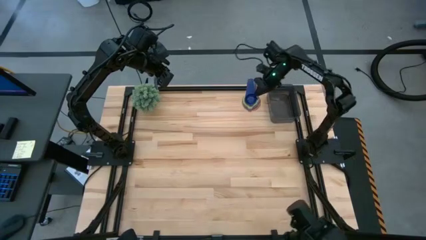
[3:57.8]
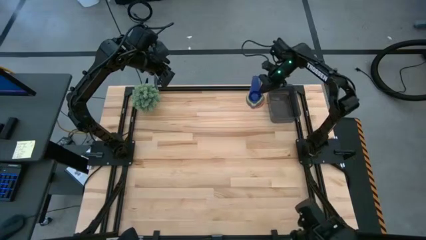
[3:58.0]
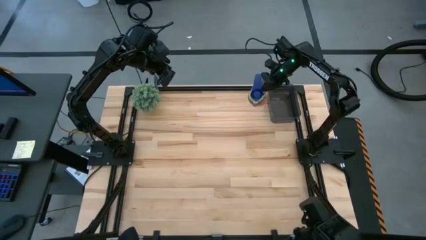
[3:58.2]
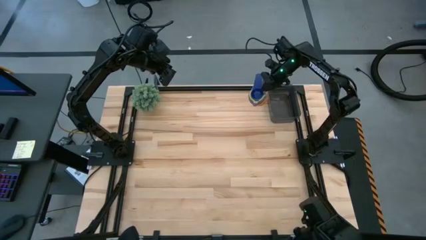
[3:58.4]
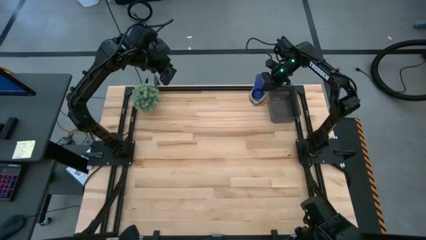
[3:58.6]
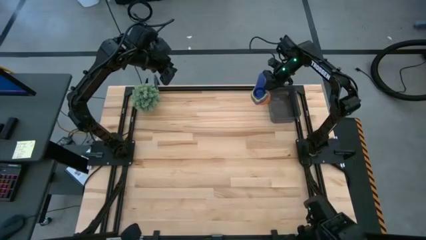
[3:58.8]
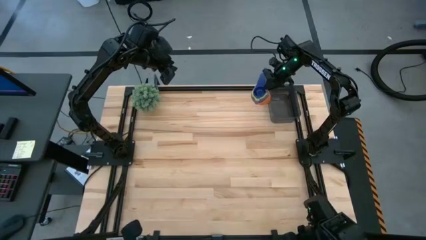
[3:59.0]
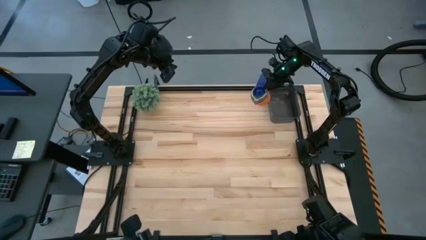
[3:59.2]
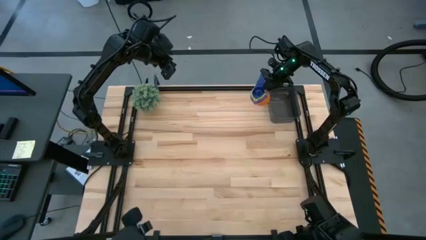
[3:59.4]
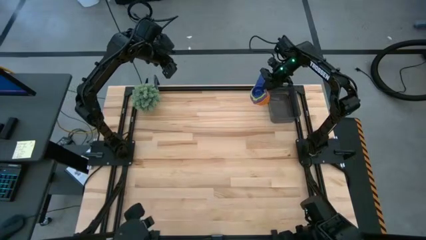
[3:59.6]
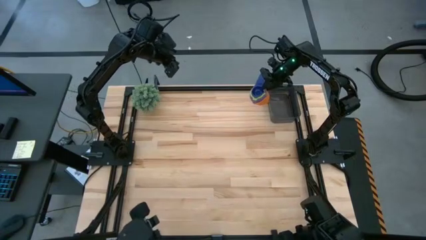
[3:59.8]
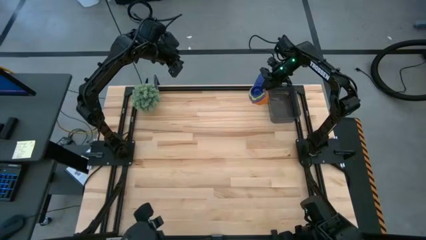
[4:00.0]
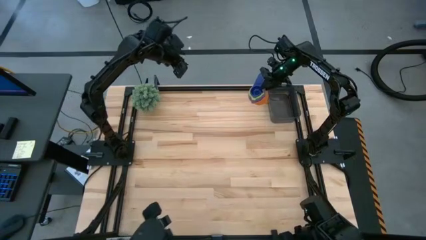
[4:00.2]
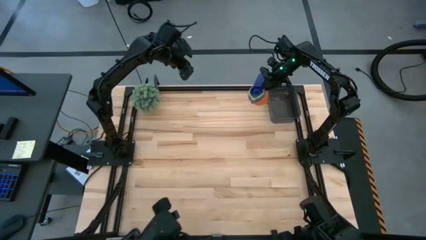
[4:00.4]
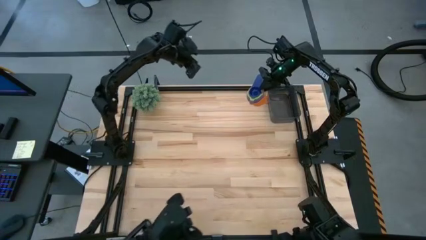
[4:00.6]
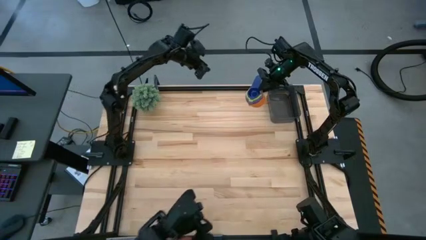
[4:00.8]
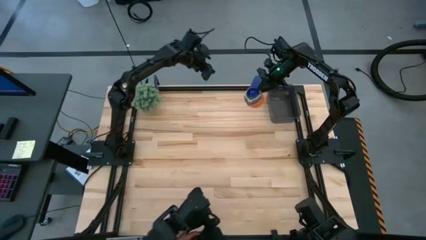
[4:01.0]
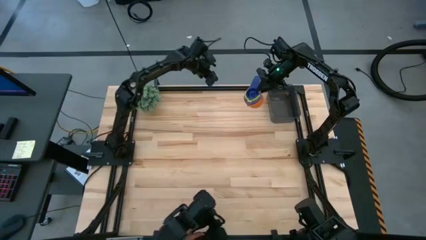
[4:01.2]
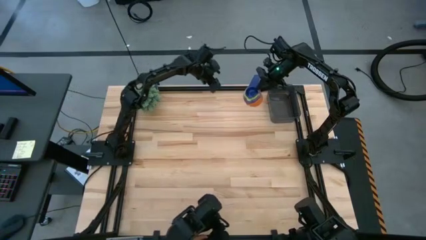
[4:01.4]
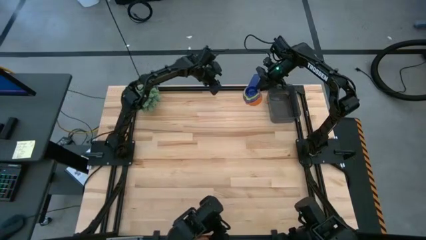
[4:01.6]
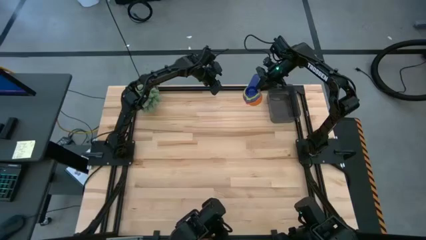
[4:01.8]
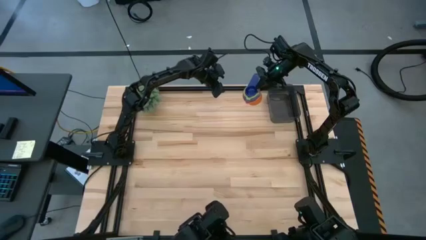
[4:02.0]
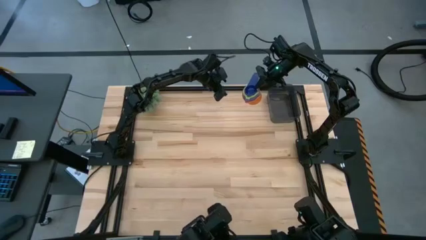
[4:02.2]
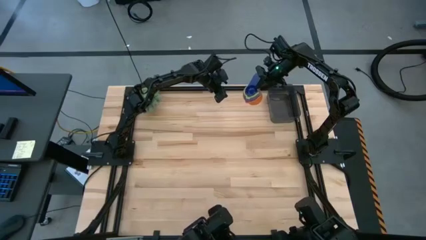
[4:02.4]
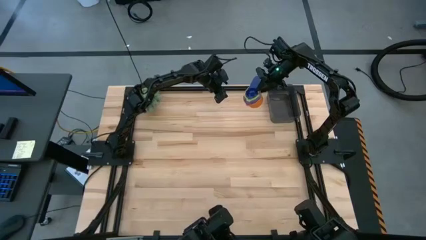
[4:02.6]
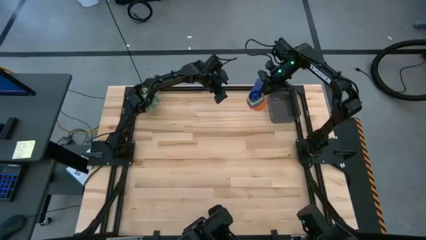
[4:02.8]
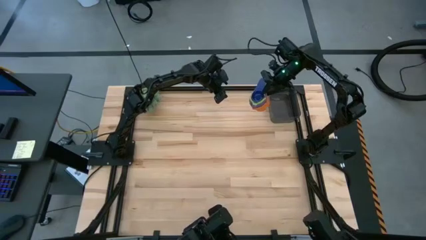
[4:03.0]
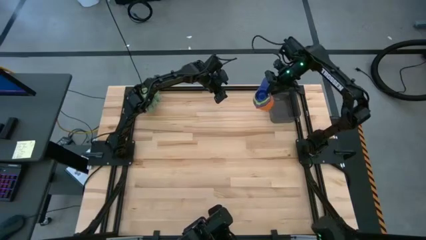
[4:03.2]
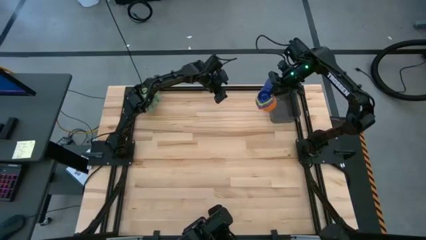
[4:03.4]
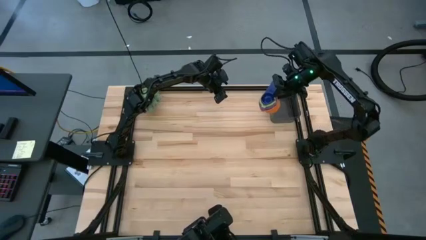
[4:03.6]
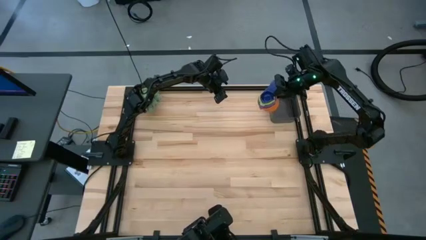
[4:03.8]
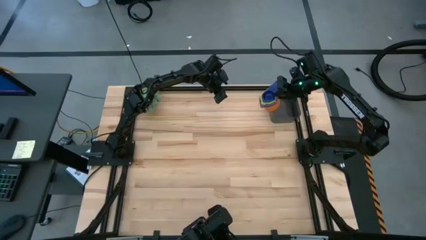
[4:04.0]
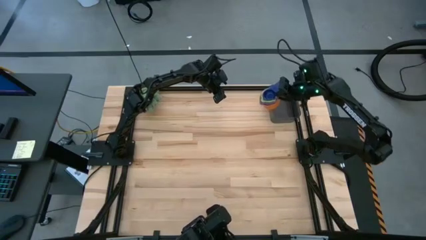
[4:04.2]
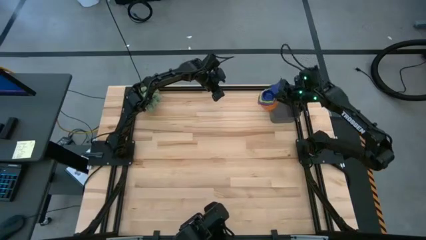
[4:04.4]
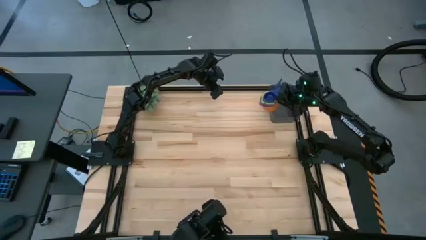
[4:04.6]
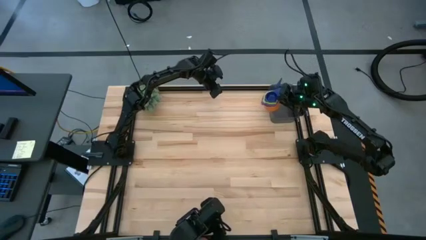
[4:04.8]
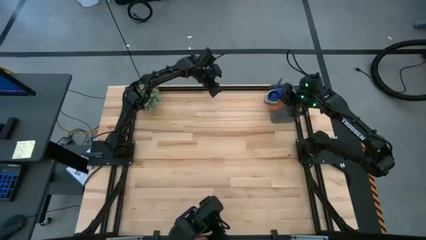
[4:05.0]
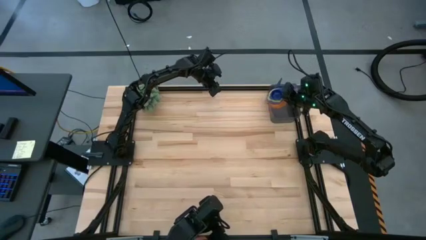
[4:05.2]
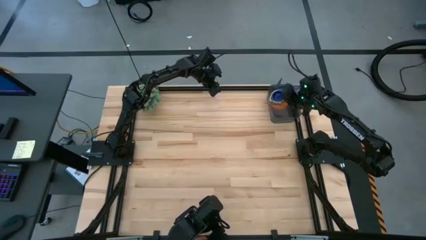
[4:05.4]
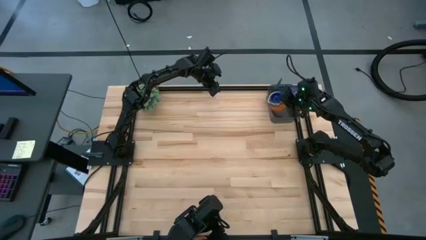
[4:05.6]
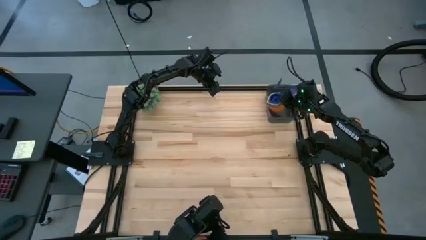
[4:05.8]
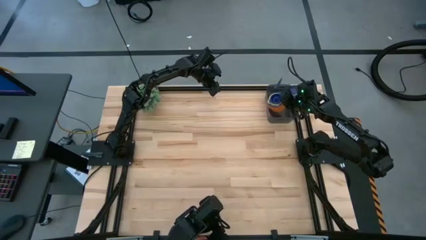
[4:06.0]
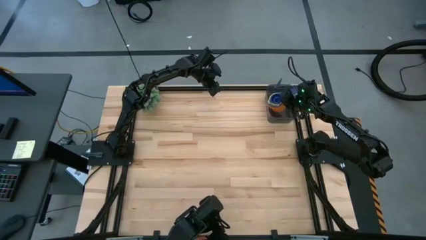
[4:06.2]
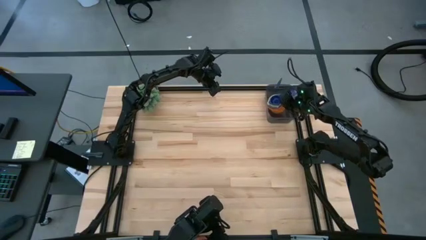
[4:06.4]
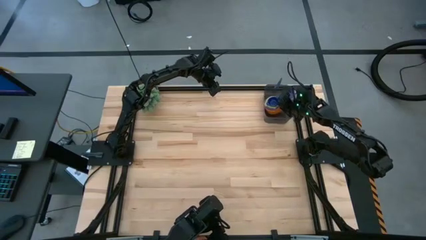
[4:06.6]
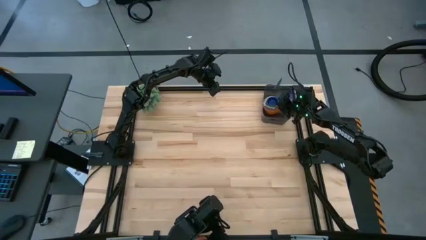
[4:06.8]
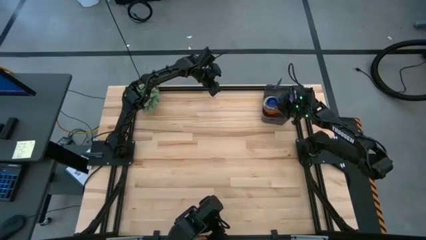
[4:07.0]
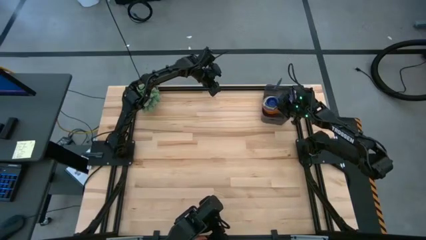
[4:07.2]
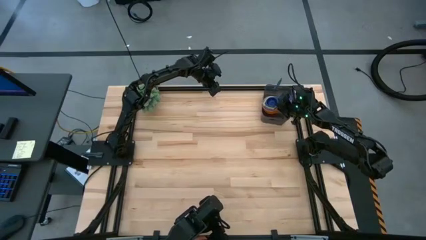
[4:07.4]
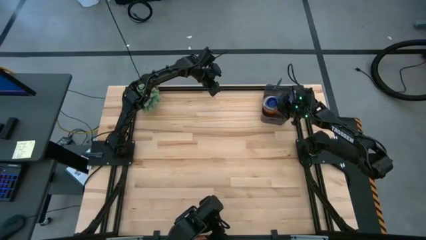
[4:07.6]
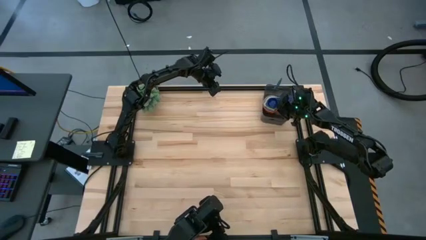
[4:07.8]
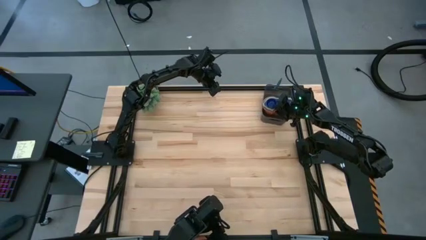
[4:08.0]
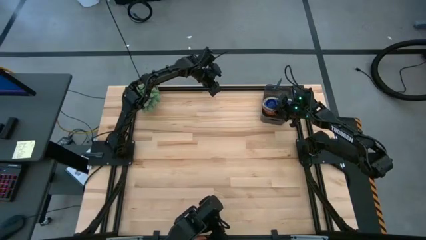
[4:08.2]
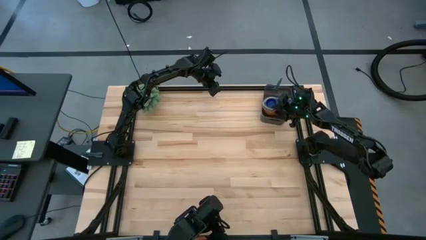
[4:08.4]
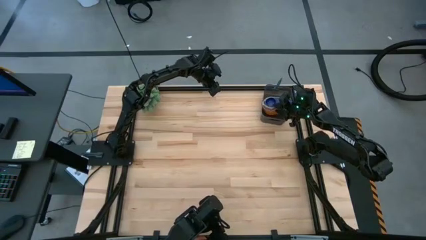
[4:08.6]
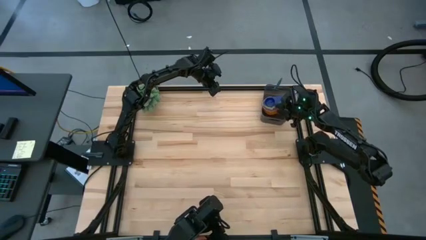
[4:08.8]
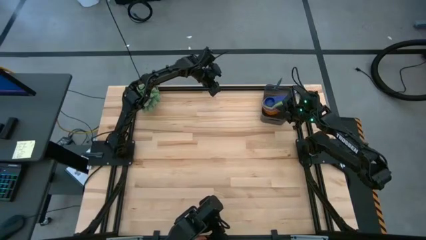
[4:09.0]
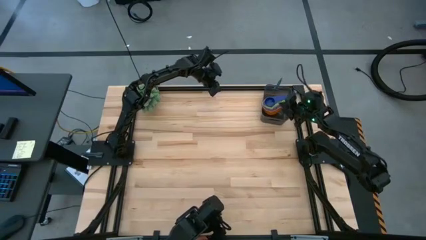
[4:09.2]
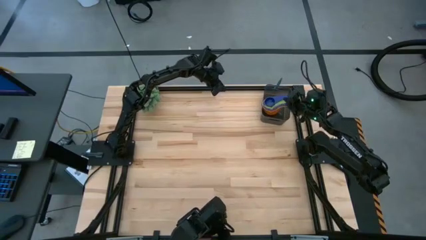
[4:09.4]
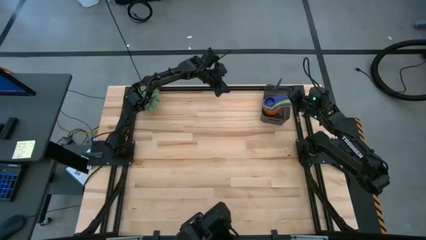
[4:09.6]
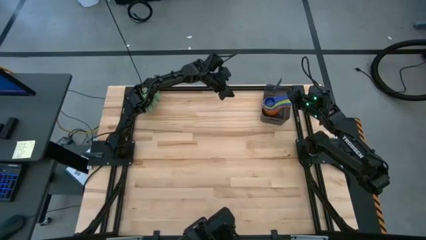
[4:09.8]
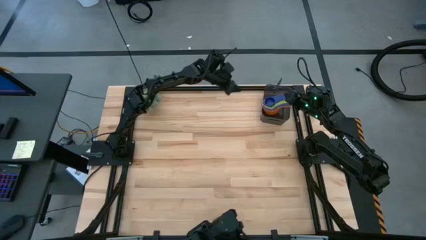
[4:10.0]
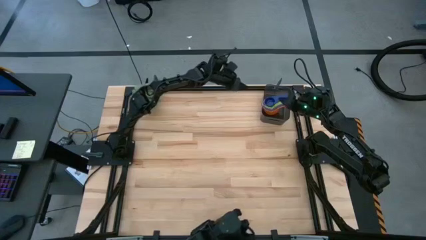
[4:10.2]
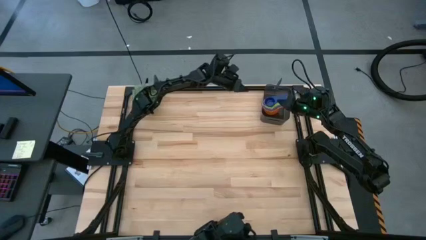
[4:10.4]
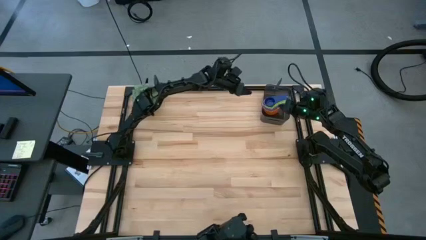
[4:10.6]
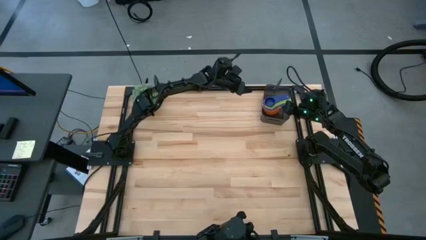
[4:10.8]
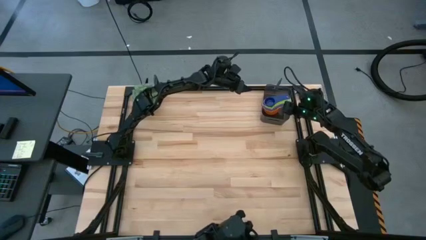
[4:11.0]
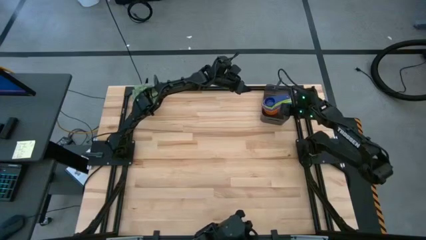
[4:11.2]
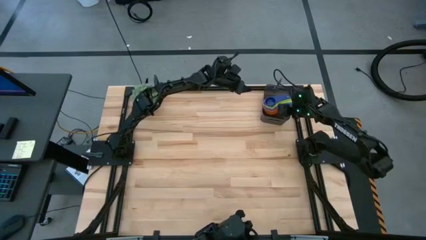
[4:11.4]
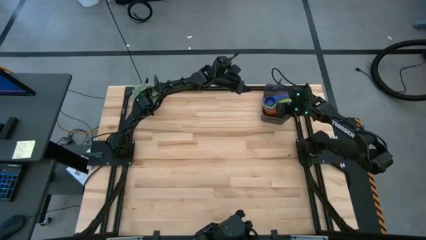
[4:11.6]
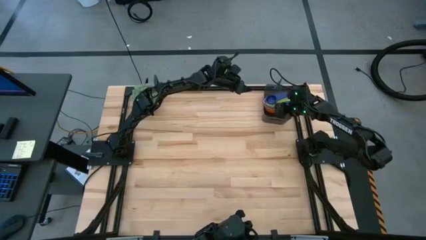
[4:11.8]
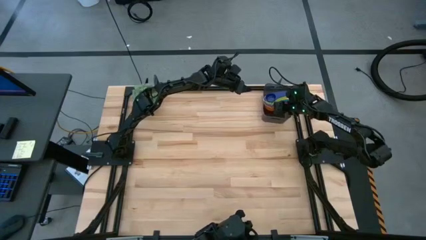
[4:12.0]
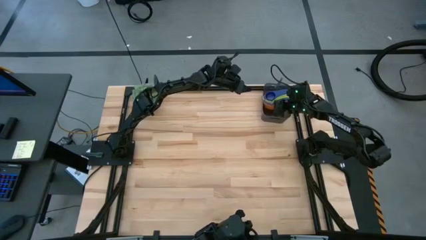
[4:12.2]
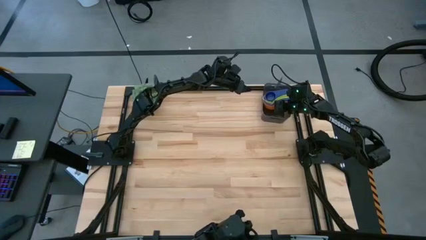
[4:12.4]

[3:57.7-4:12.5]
Task: Nest measuring cups in basket
Put the nested measuring cups into the black bin

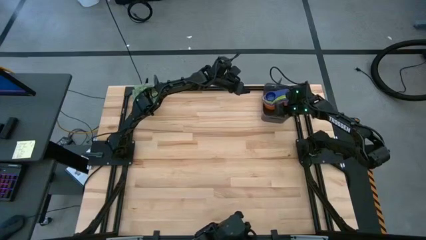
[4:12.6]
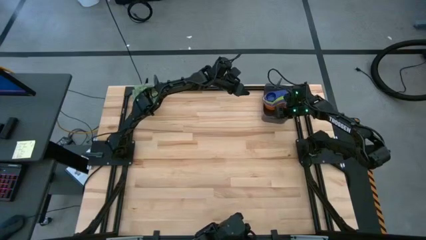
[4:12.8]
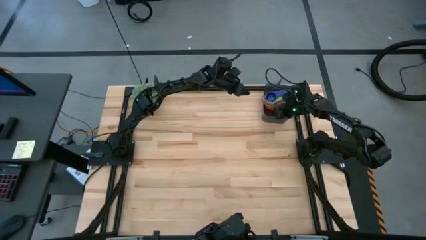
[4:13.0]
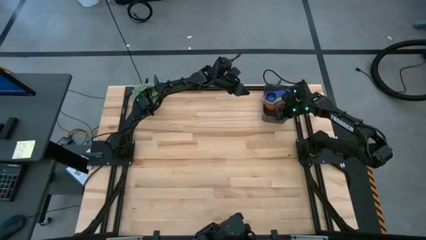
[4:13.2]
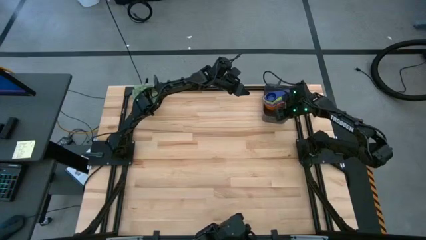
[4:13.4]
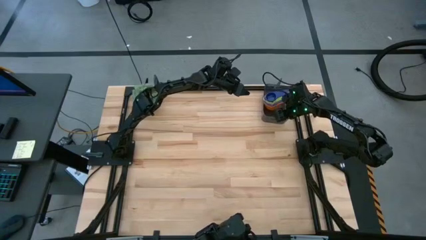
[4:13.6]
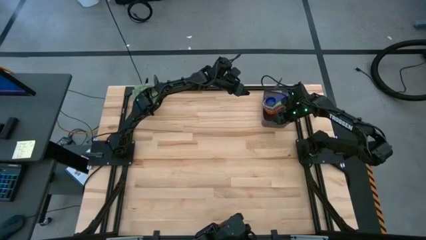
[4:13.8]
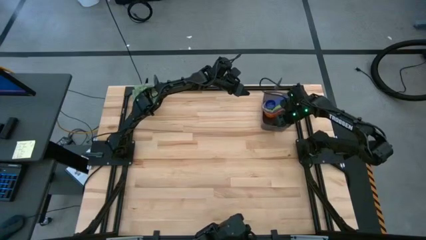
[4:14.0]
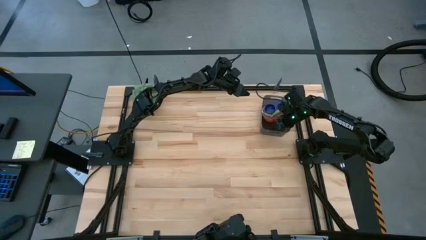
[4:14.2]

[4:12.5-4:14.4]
Adjust the black bin
